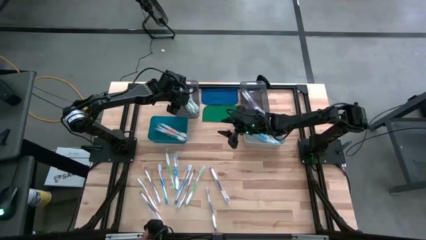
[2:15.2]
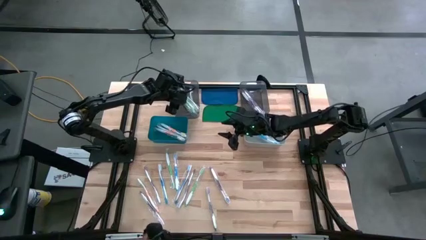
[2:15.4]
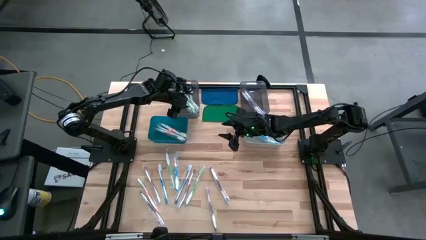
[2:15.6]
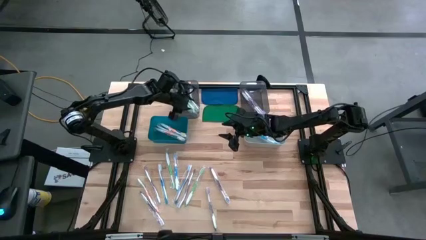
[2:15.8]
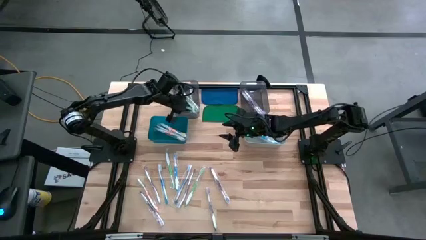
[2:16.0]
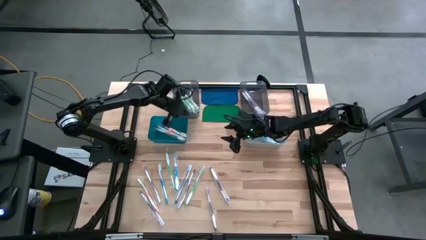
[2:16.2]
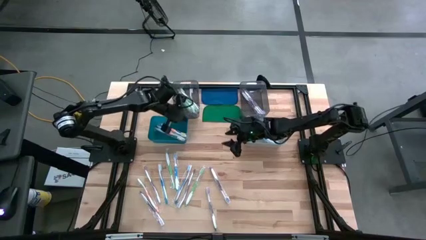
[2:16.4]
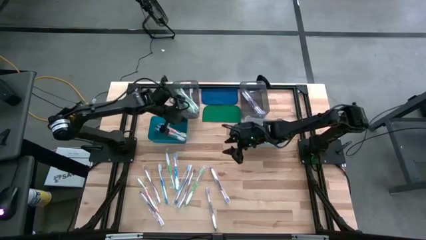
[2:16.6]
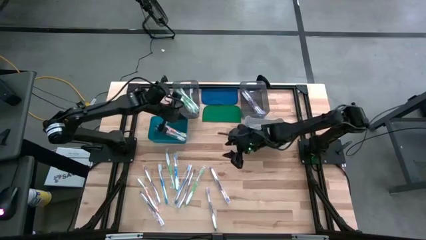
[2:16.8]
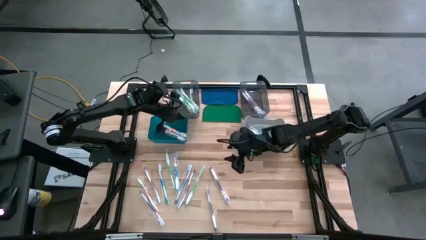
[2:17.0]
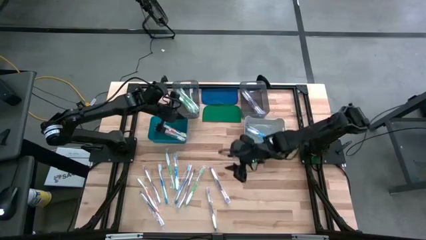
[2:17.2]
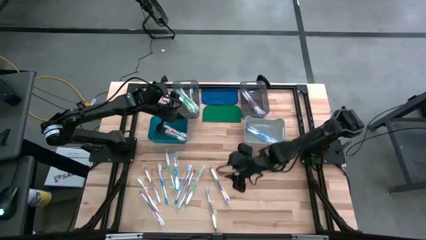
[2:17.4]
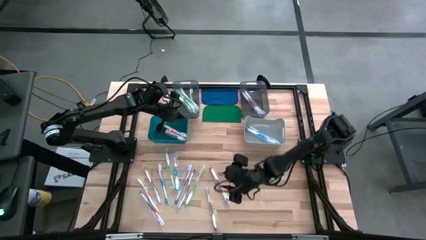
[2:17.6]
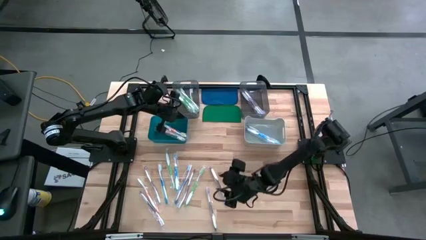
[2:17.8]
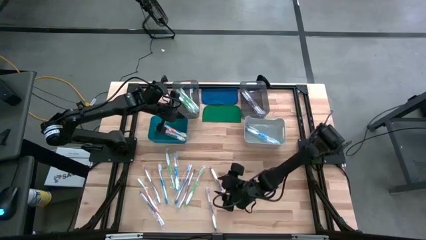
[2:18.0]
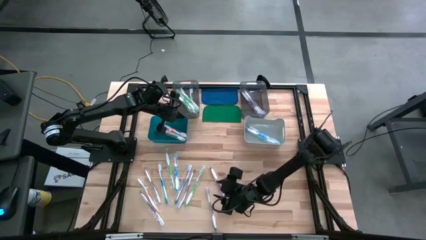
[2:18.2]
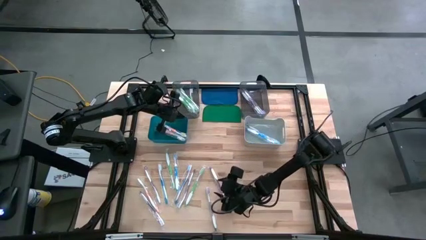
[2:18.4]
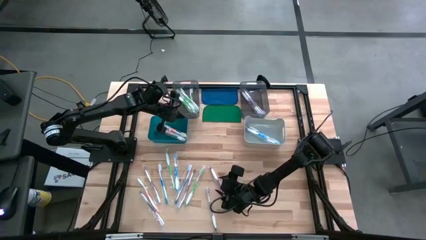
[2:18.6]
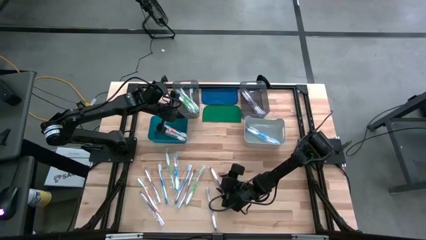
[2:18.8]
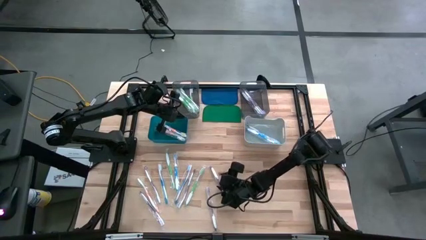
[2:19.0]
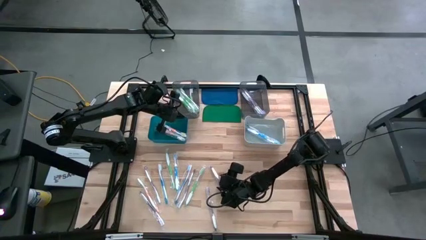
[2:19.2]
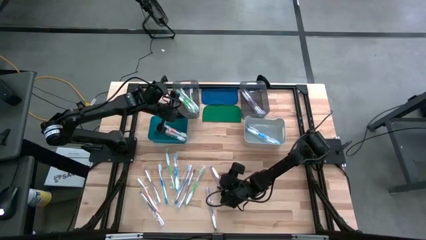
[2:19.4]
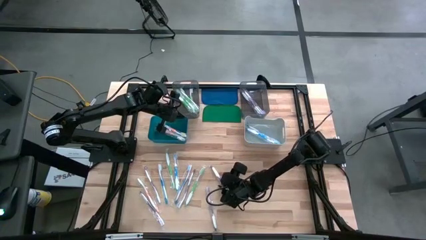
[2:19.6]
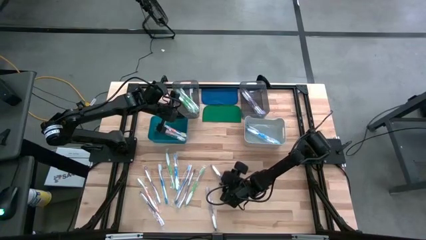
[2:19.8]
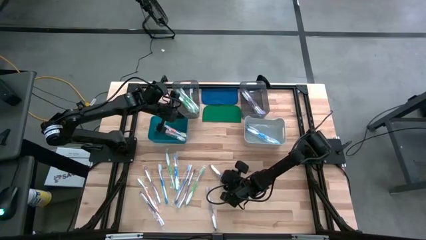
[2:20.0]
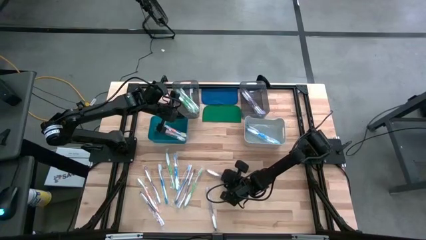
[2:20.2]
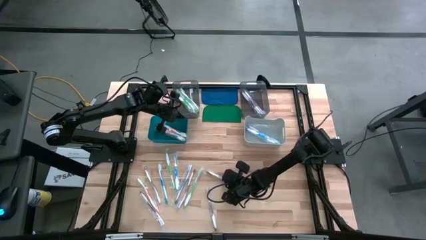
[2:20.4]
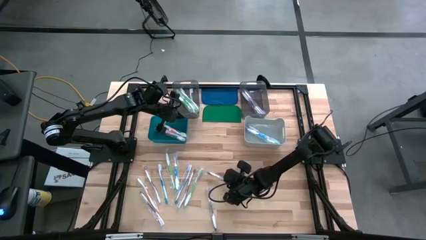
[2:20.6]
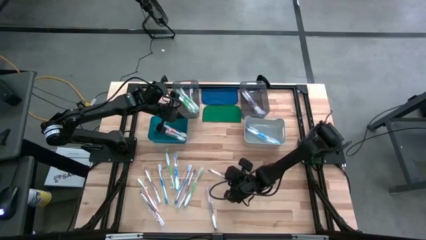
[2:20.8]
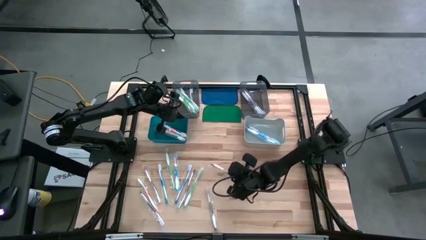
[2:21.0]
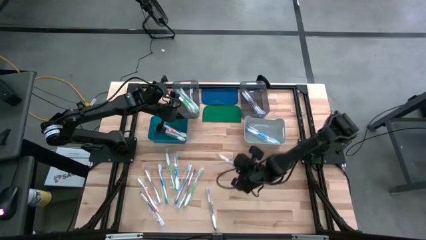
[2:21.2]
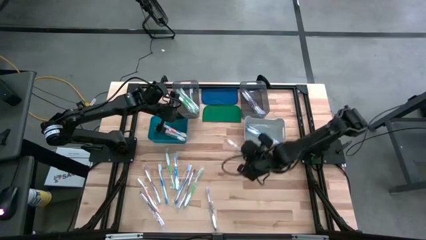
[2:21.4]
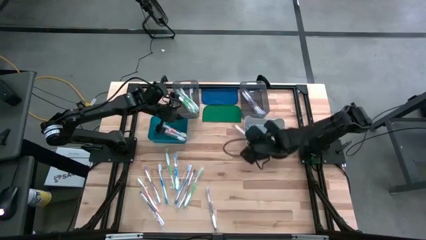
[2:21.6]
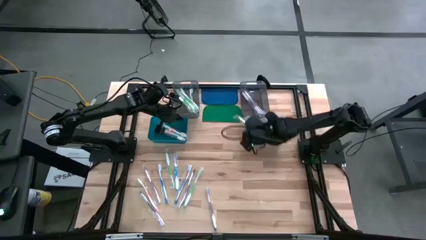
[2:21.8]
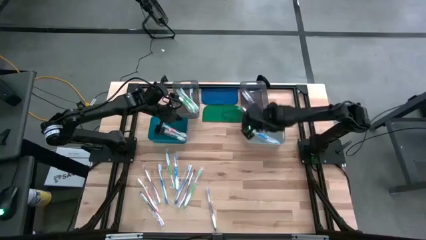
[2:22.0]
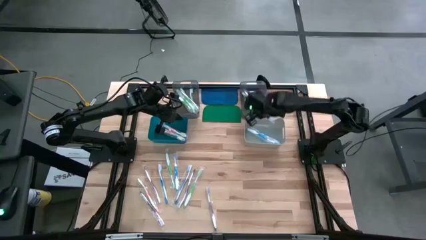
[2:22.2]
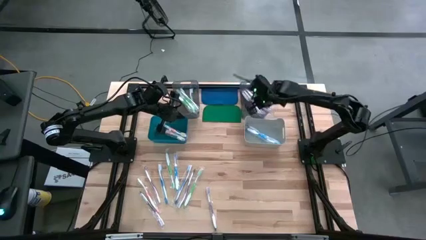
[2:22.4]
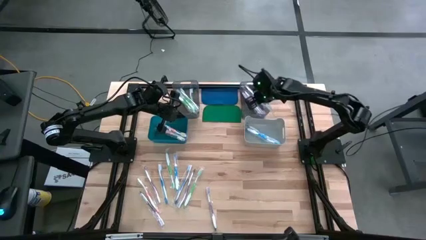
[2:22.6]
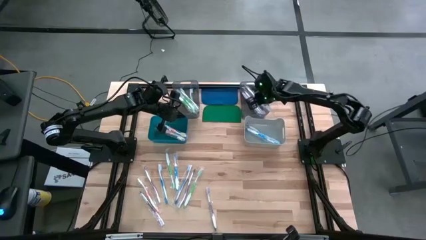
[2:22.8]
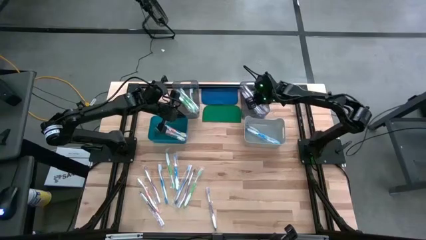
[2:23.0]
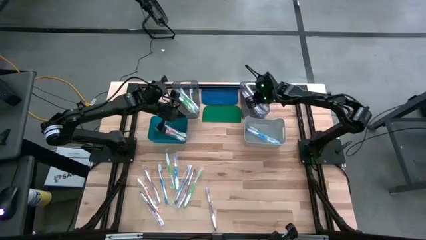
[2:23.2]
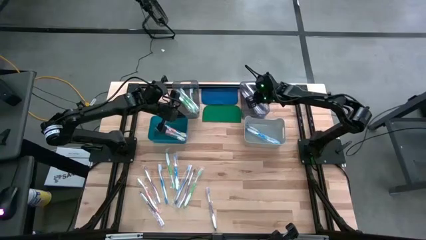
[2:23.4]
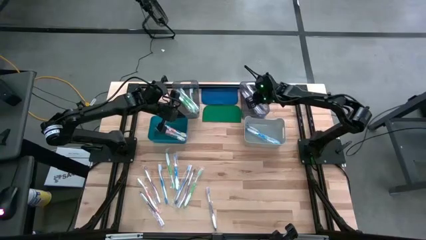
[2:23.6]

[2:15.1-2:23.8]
Task: Pick & Place Toothbrushes
Put the violet toothbrush into the right black bin

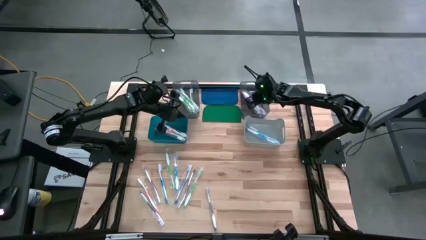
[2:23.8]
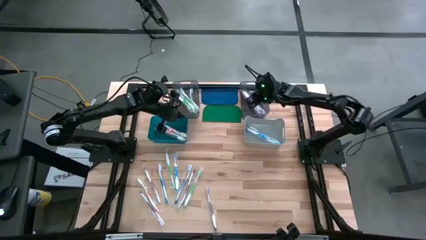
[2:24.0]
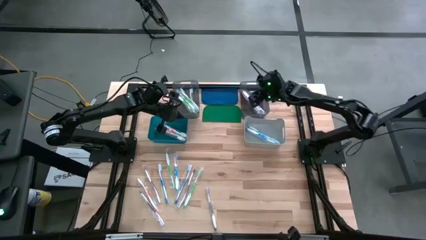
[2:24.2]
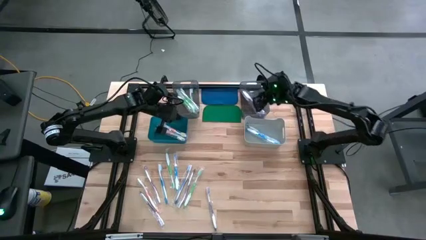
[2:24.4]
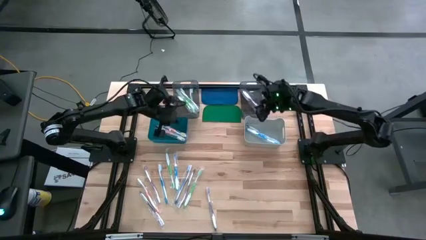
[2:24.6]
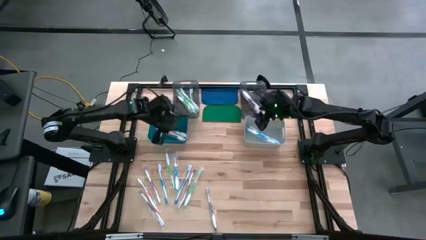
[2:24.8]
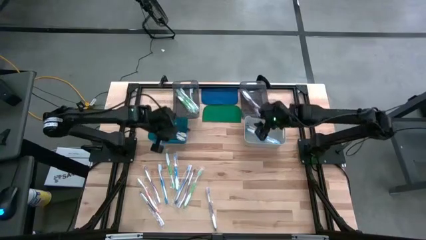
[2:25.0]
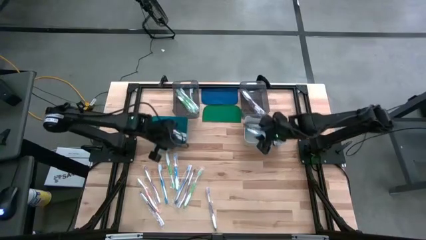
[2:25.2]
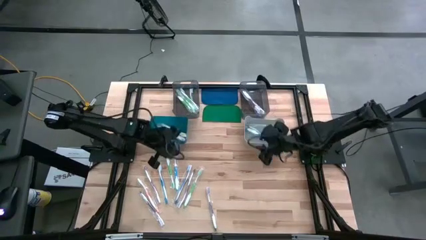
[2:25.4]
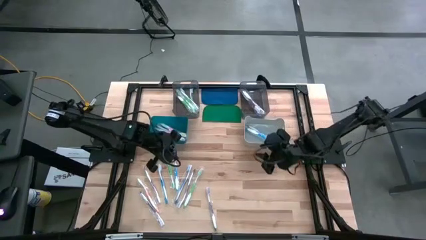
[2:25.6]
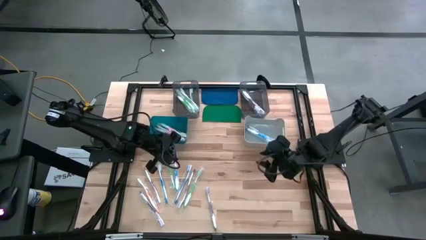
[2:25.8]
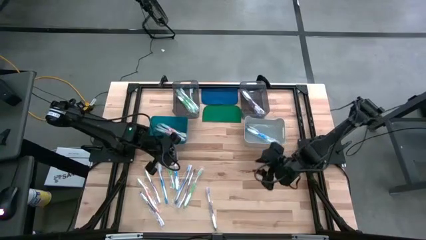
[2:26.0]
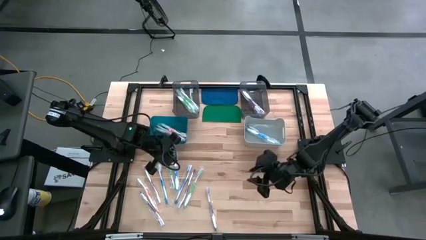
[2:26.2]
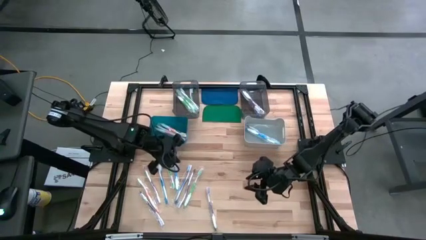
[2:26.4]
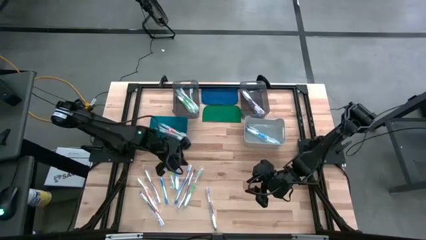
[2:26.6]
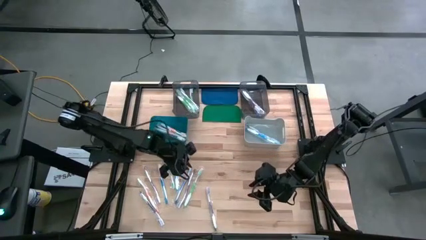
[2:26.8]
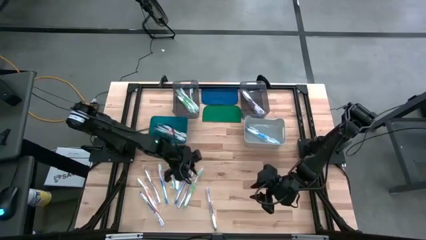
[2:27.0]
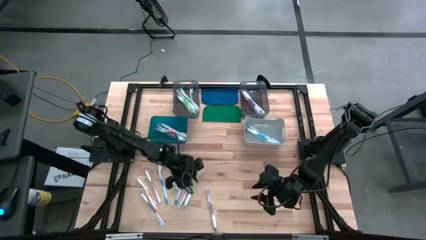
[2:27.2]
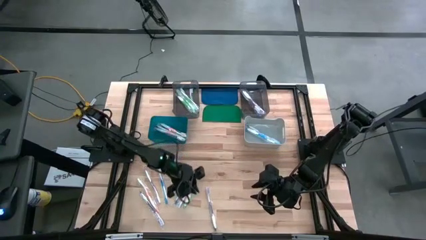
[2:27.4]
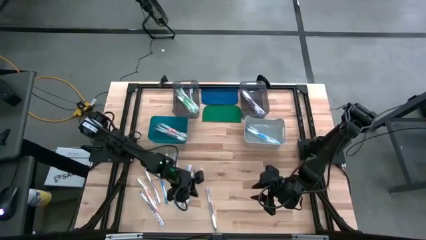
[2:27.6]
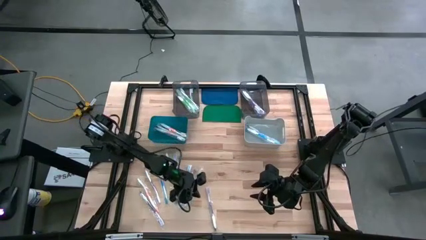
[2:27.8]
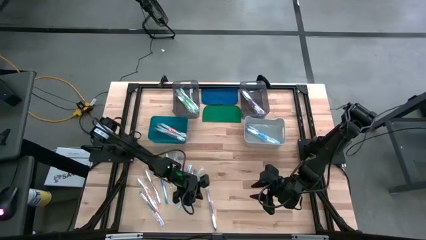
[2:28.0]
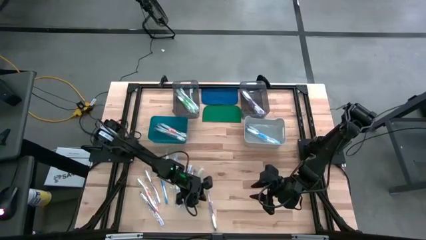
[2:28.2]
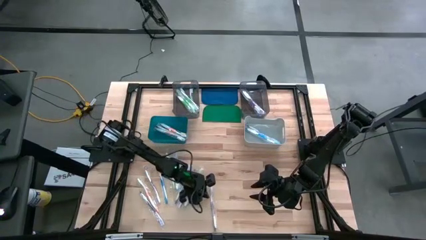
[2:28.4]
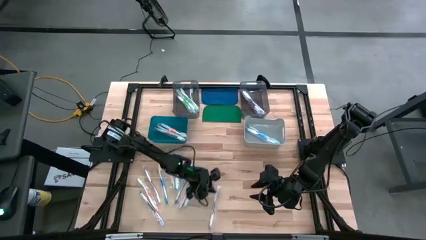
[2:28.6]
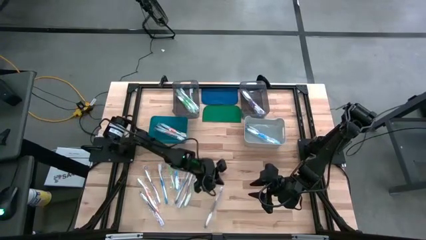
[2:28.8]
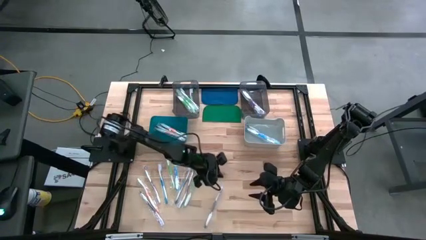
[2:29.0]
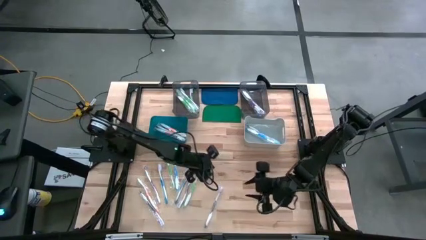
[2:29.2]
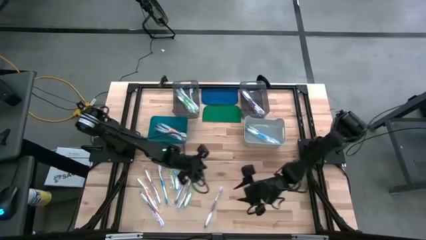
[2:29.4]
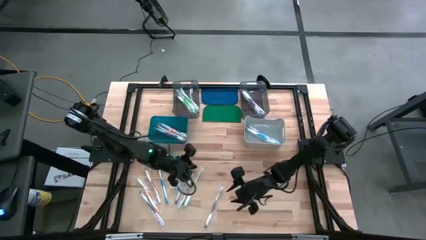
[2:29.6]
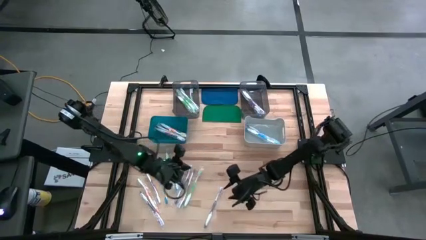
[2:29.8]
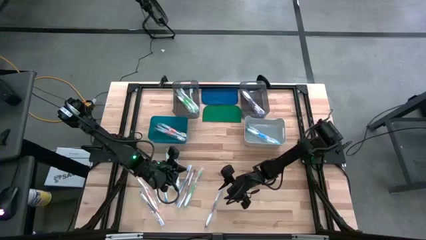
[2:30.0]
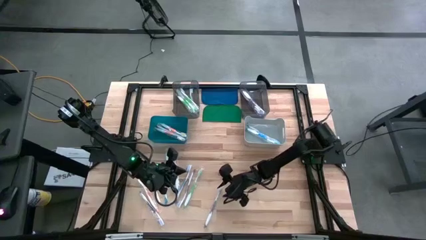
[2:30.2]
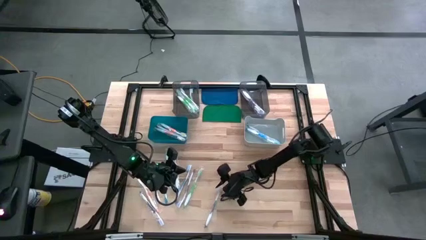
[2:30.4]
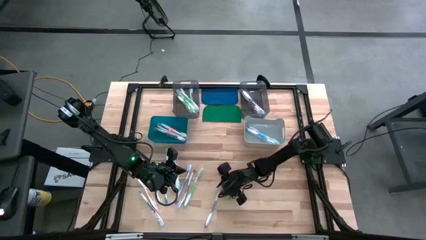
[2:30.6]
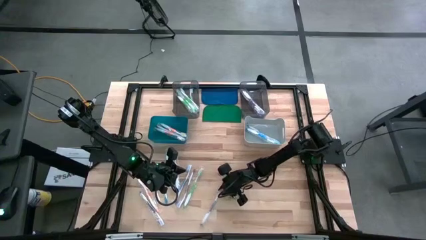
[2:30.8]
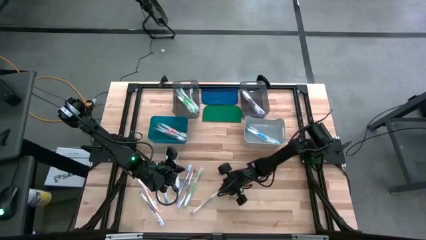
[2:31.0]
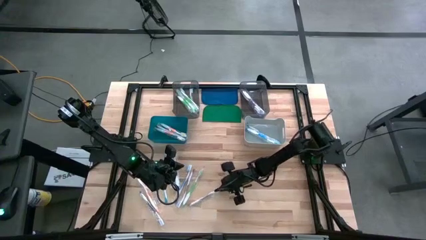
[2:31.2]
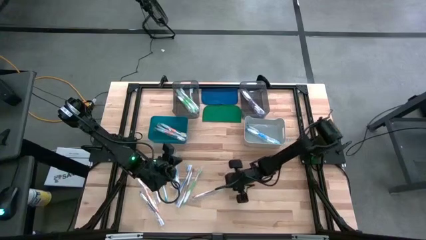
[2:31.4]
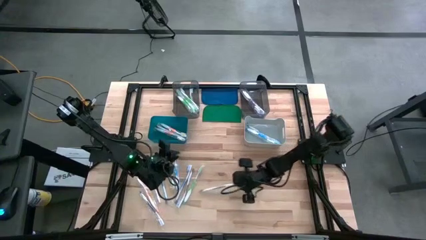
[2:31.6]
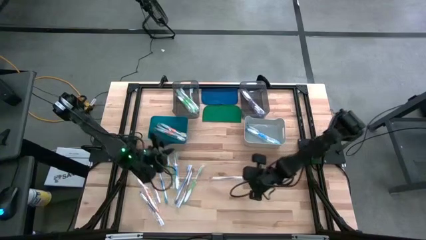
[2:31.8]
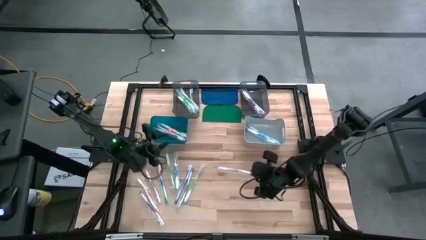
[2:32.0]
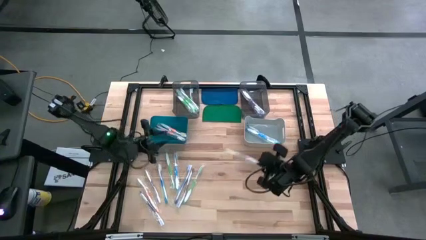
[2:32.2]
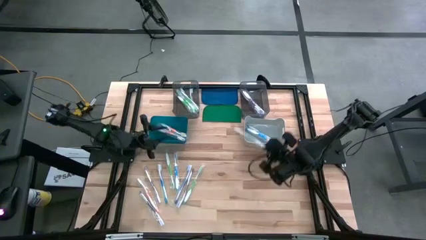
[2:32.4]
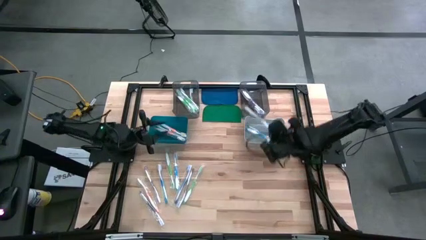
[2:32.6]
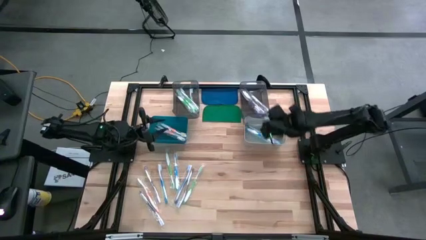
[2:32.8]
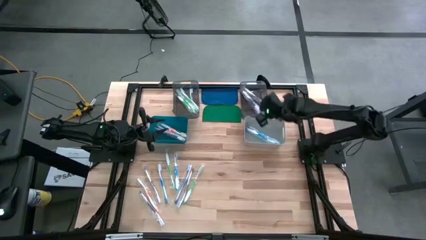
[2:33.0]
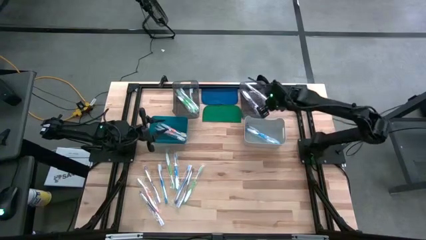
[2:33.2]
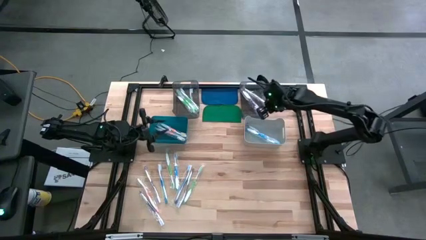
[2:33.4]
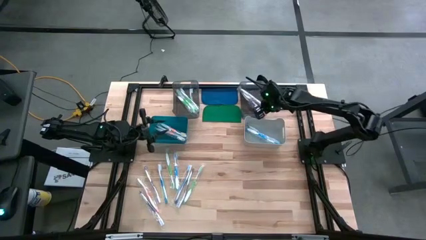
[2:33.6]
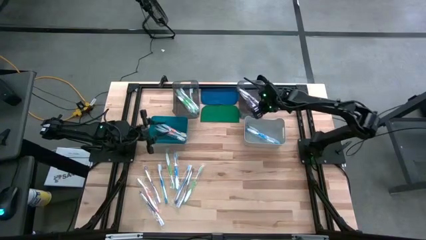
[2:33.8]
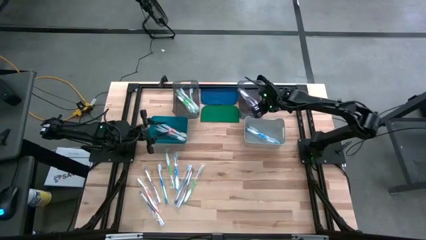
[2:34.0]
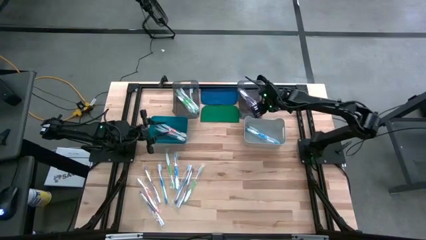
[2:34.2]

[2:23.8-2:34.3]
Put the violet toothbrush into the right black bin
